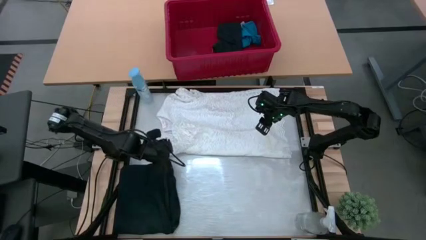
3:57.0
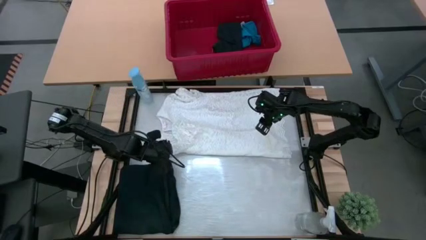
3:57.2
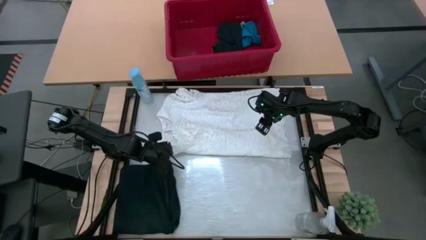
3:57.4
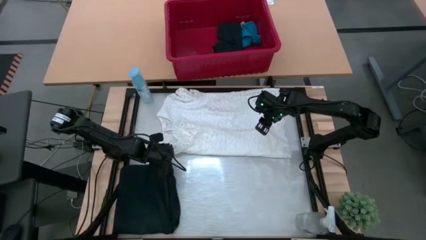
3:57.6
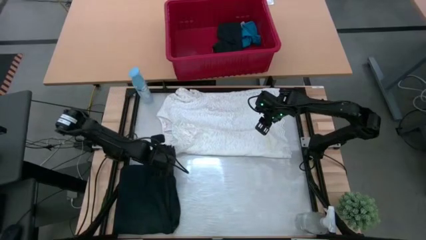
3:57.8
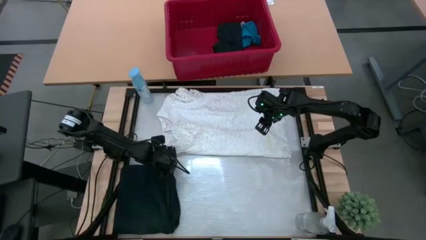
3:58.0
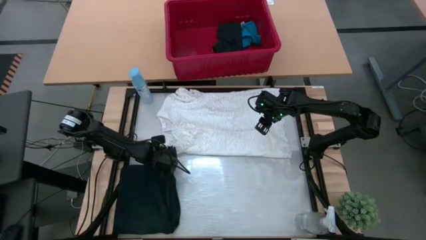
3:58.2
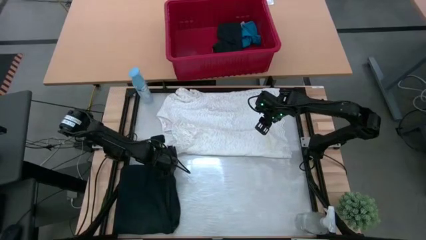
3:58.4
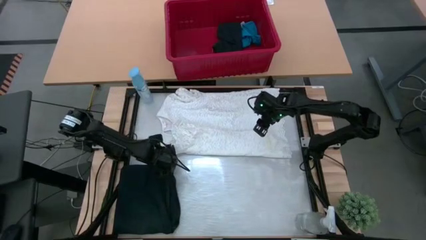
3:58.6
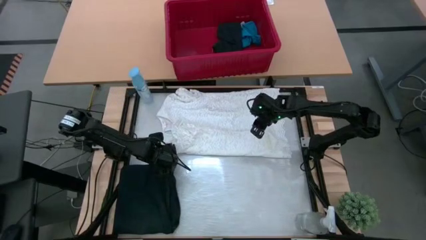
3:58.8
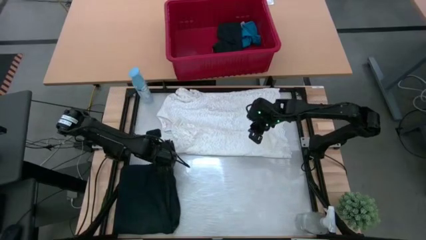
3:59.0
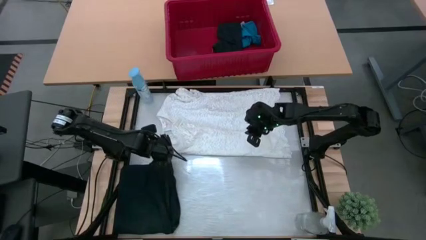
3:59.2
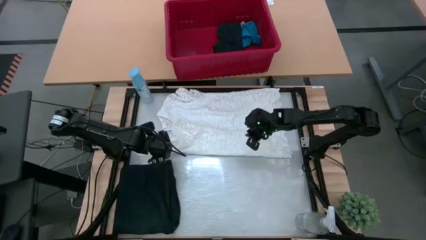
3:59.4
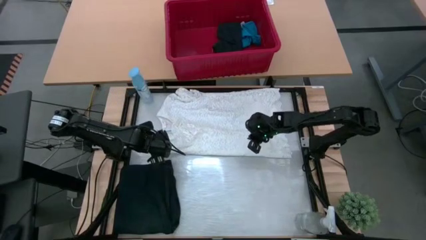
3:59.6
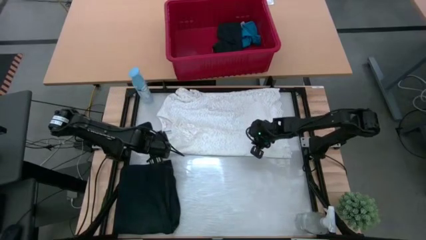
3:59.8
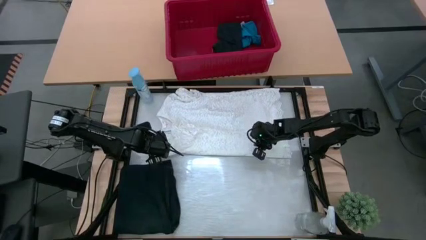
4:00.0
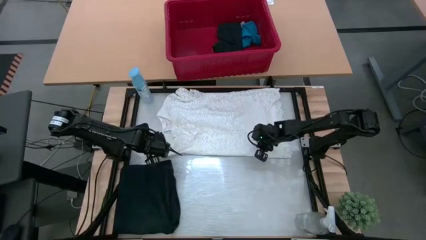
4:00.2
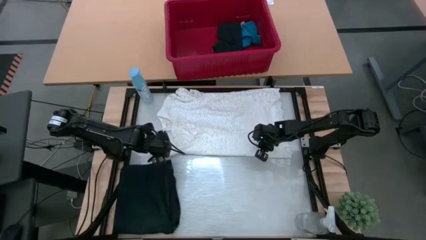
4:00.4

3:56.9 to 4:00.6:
Task: Fold Laundry from Bin
Fold the white dress from the red bin

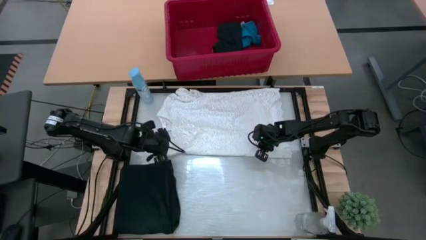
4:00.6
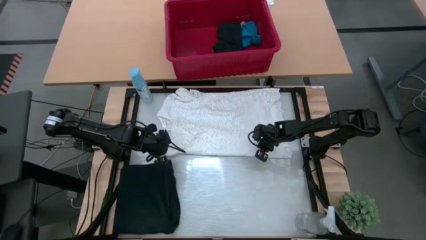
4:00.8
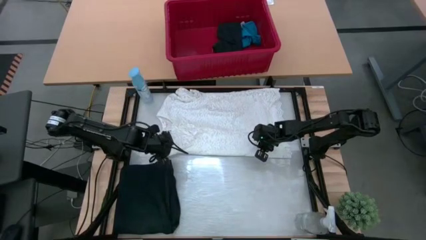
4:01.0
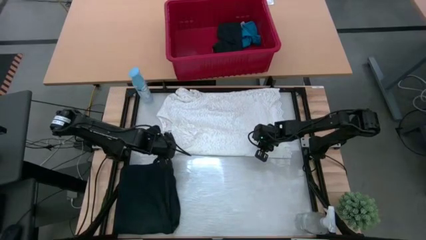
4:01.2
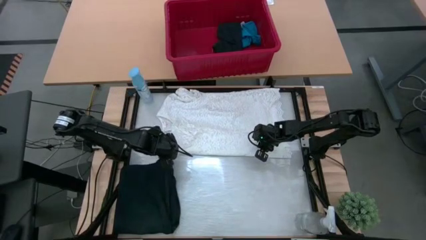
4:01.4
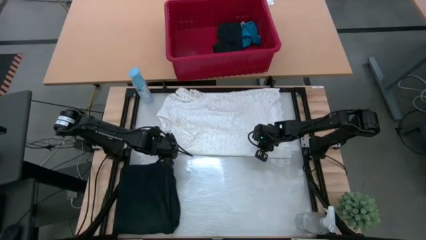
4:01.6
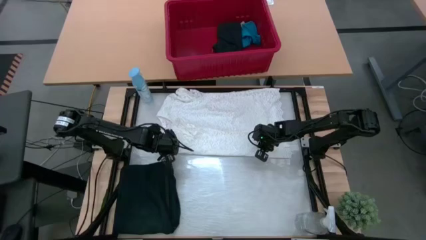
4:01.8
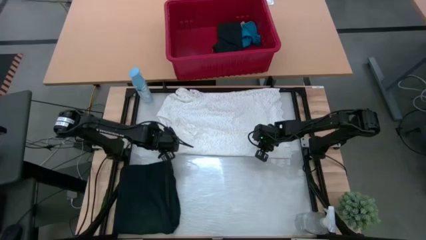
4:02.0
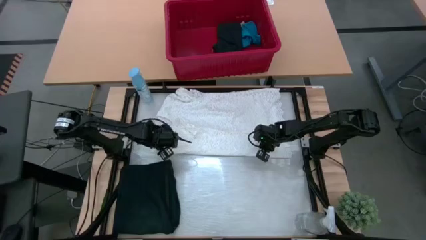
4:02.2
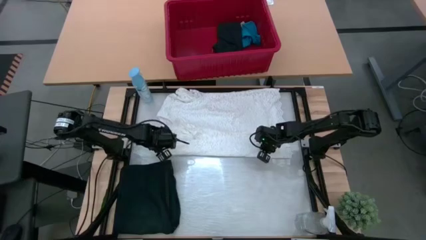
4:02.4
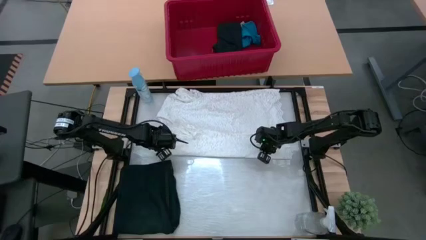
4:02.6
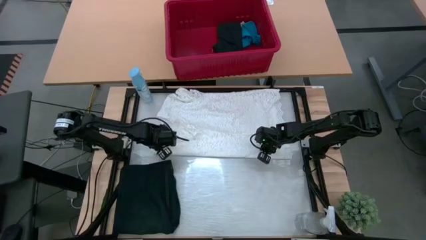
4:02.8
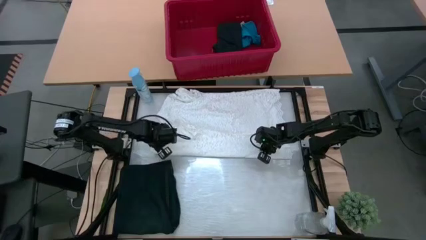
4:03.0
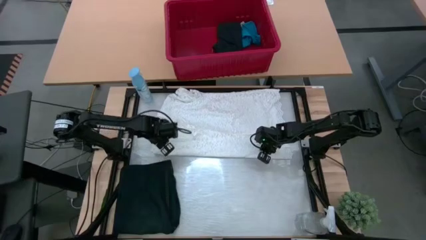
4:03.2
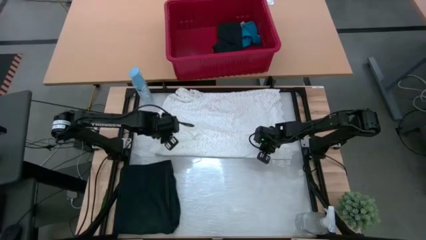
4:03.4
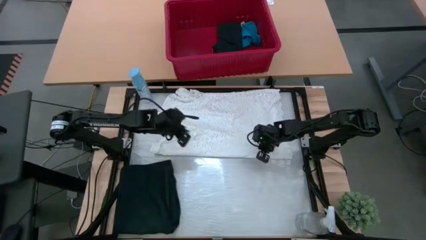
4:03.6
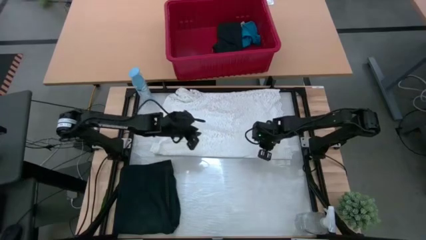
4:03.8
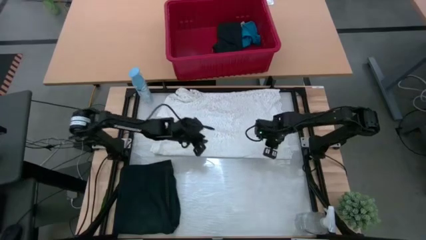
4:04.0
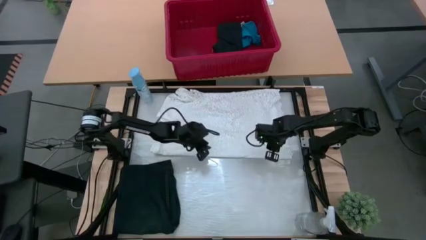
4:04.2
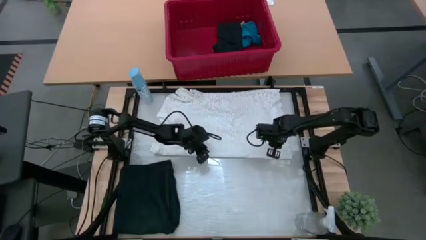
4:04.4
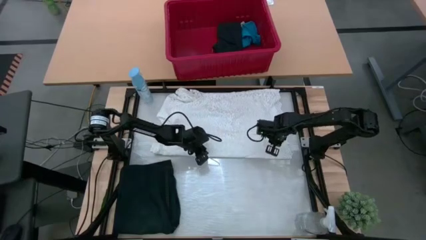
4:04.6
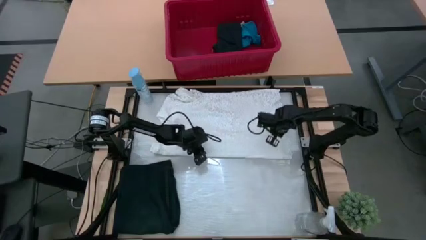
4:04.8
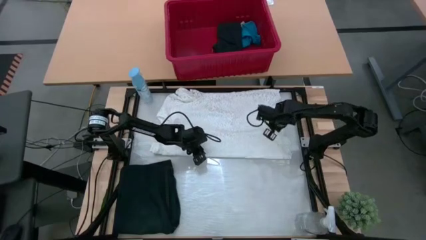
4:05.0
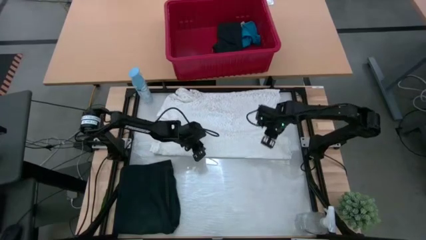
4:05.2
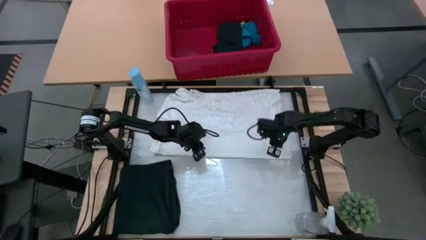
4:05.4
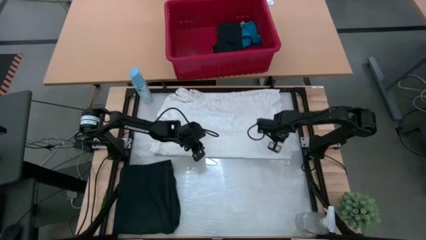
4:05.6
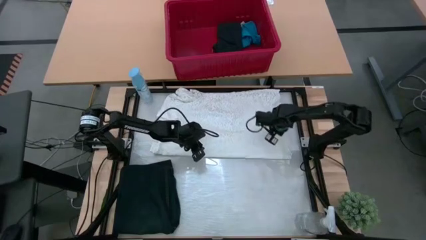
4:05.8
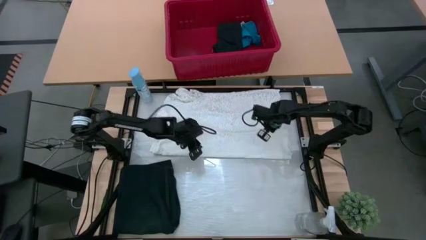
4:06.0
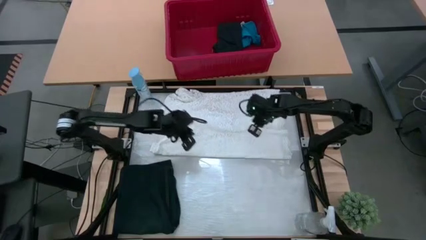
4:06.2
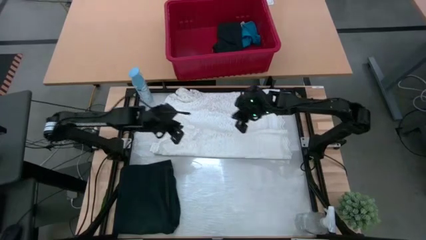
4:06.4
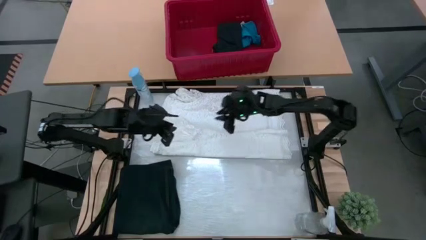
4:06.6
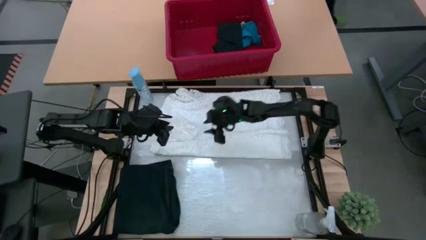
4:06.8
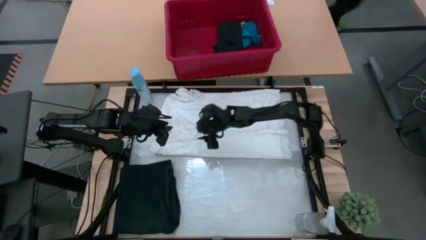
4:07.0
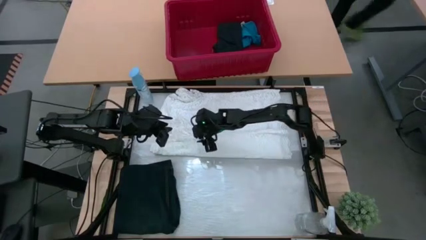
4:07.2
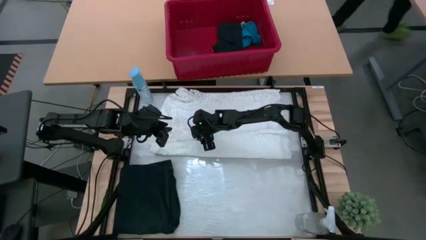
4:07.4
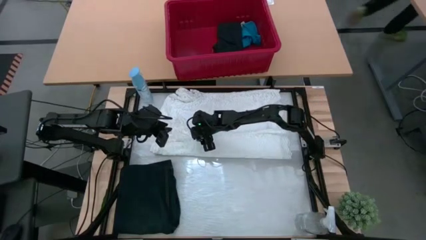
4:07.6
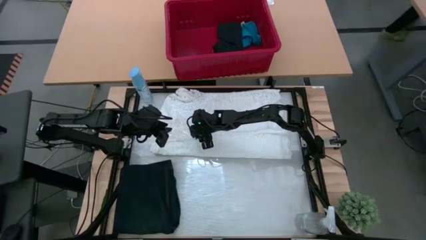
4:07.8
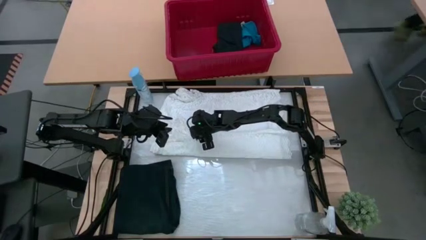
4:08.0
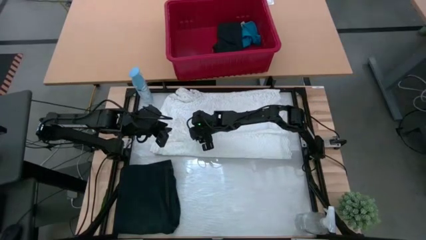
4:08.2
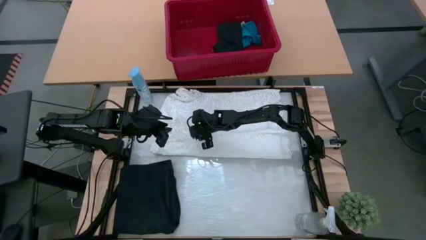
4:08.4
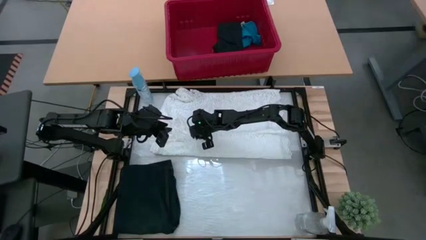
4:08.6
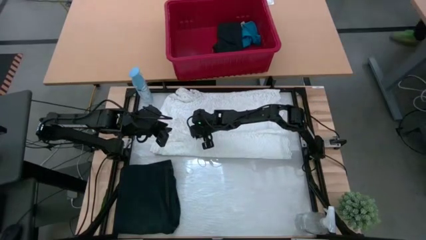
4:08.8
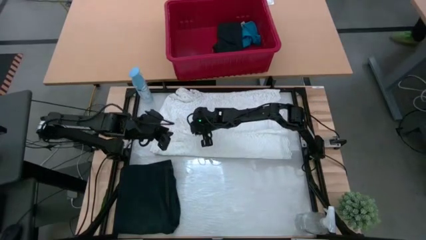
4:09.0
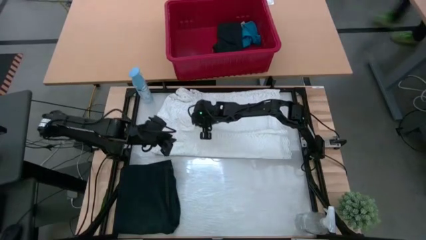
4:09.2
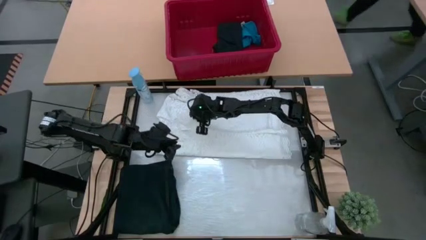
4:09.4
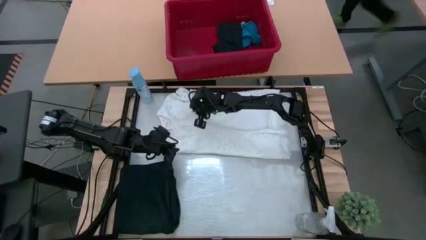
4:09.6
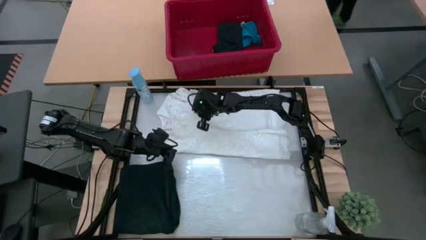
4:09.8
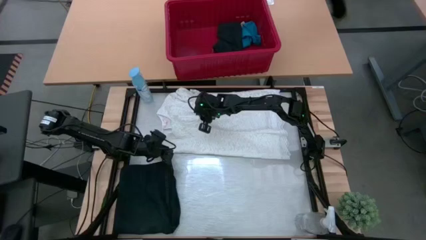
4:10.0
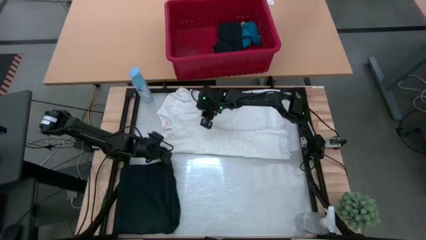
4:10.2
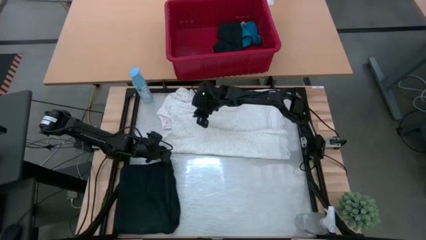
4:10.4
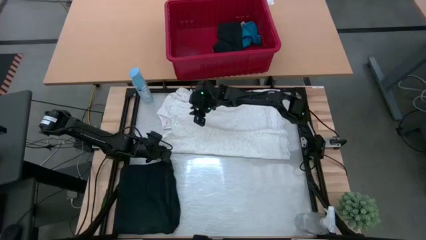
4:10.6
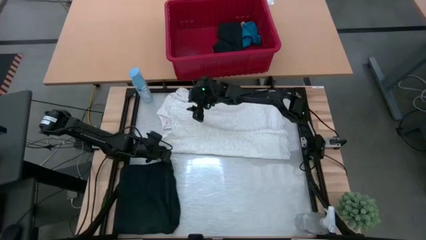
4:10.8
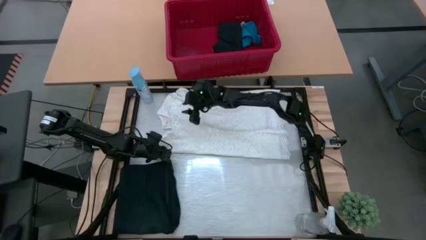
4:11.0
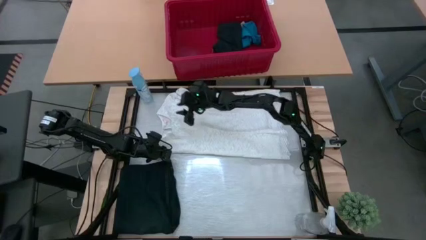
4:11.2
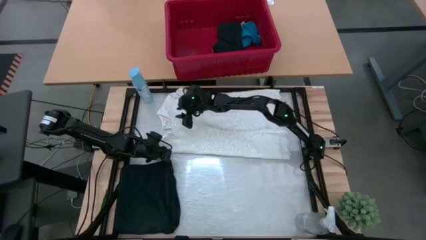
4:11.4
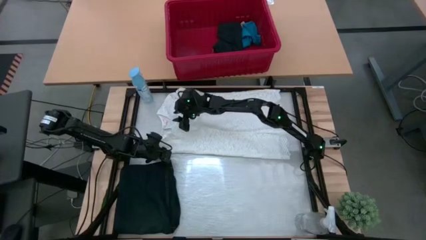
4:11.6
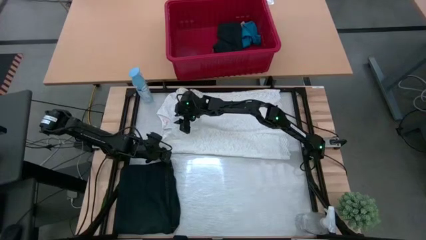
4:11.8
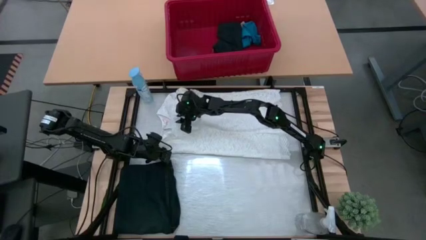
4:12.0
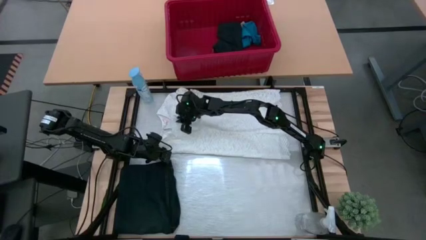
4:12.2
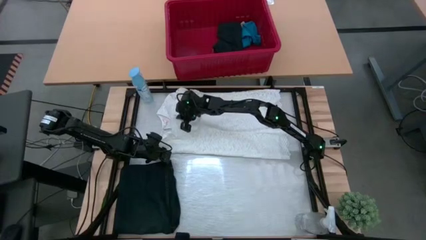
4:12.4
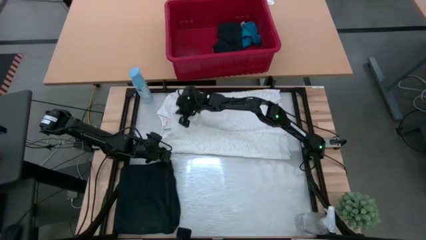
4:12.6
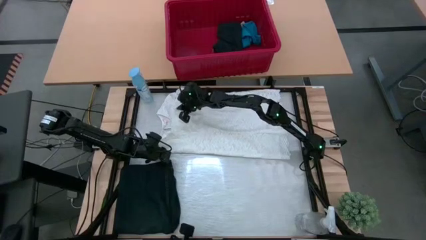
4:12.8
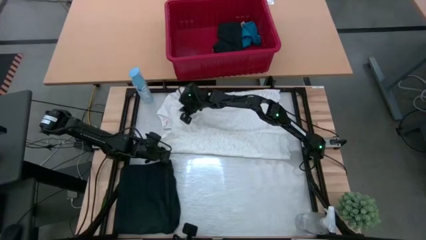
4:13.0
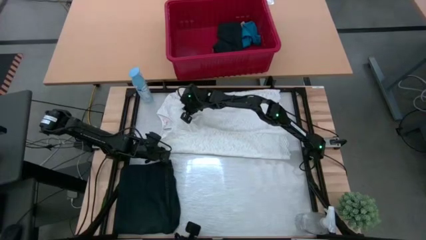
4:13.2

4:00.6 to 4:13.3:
Fold the white dress from the red bin

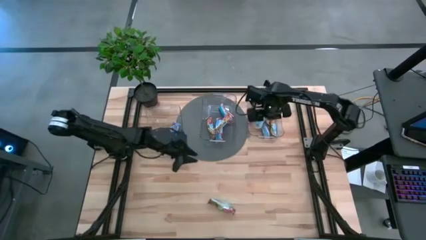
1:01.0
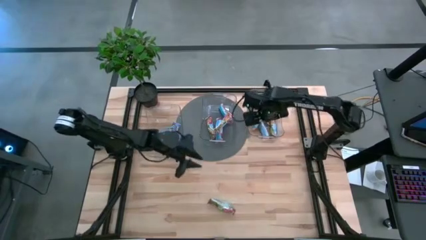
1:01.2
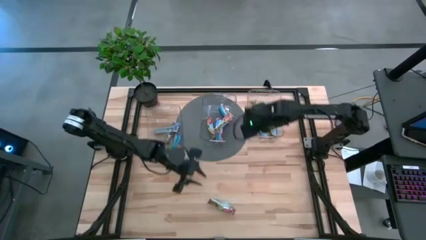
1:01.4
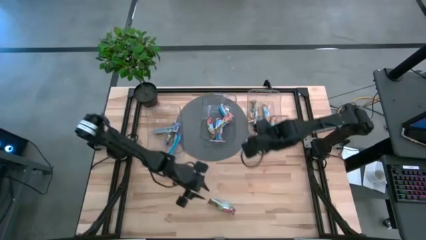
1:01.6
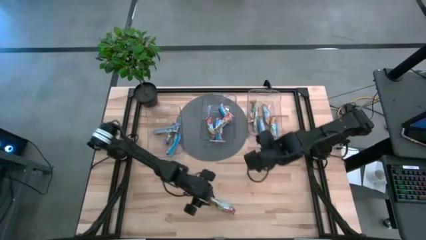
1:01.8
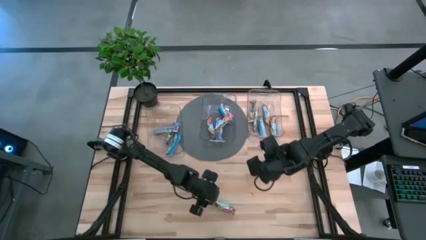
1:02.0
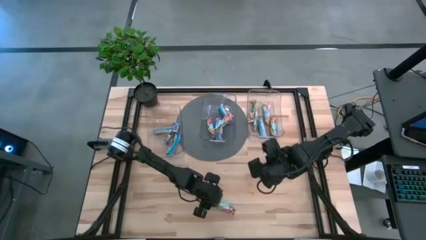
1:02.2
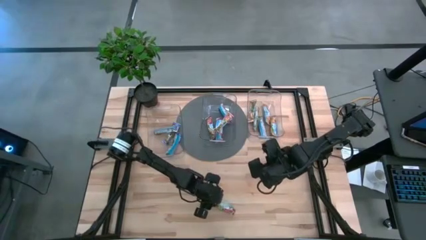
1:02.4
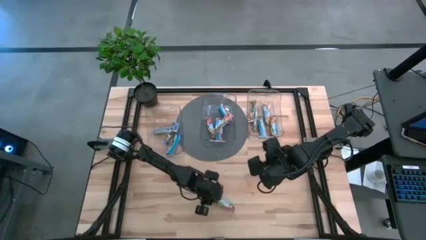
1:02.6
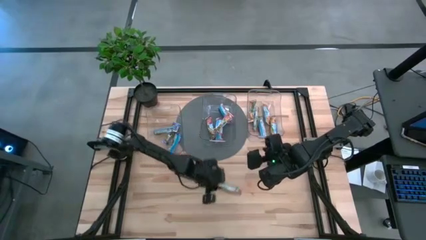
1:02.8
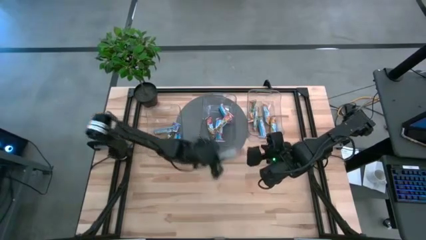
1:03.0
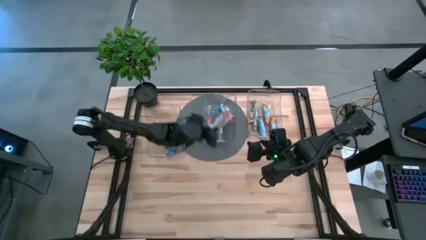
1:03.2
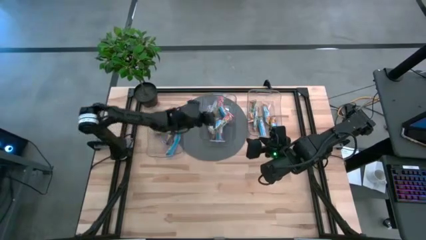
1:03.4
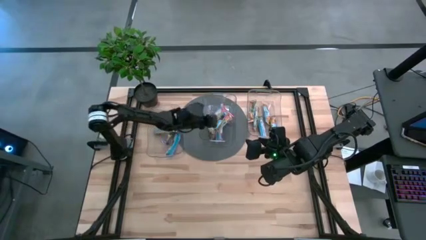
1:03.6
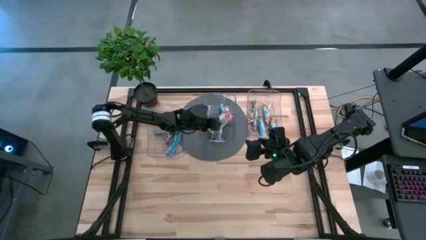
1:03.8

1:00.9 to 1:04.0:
Task: Pick and place Granola Bars by type
Put the red granola bar into the middle transparent bin
